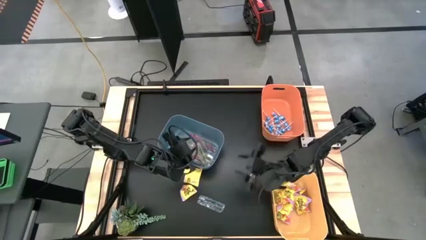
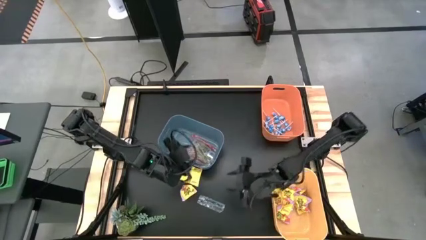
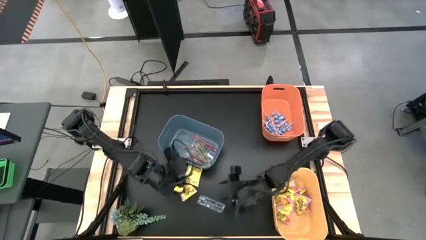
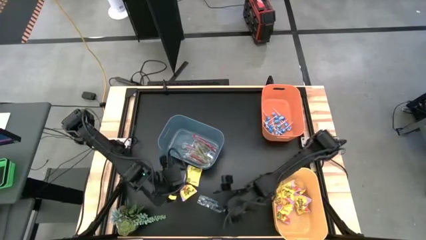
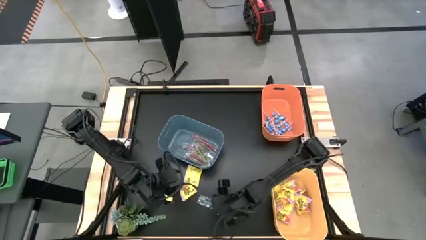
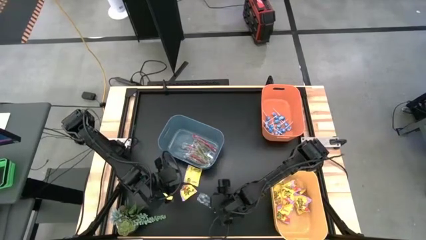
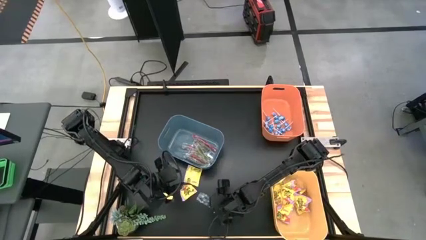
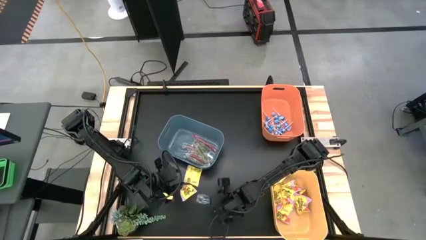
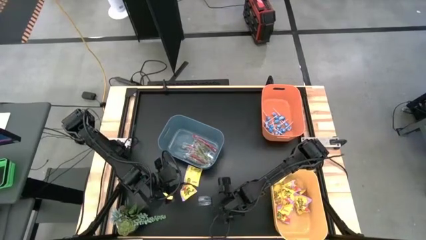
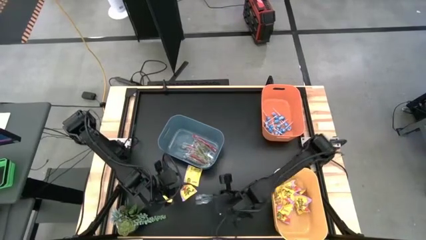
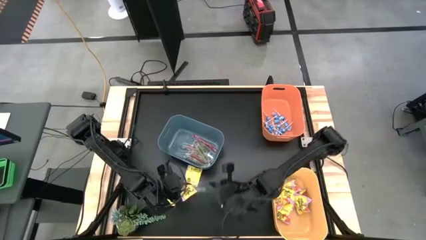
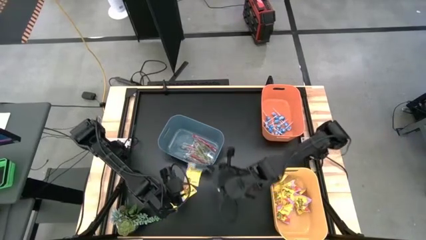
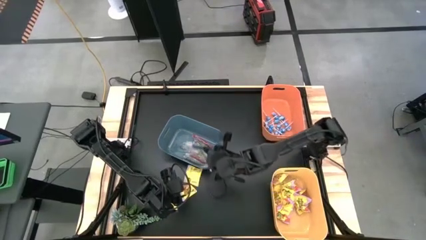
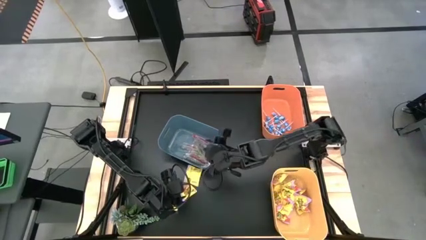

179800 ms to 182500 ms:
Task: Sort candy
Put the transparent candy into the blue bin

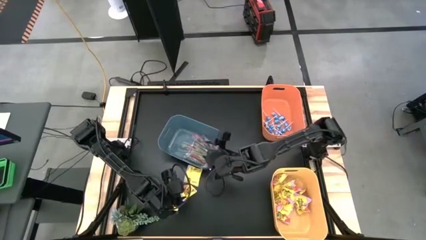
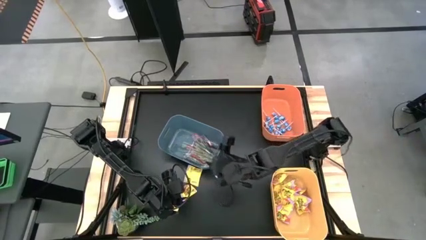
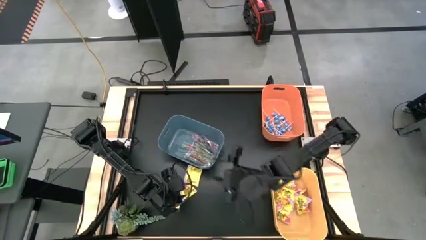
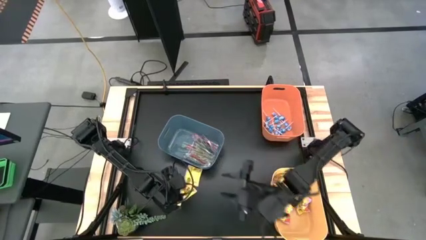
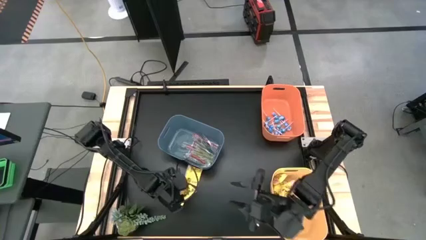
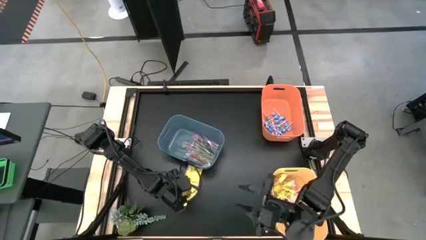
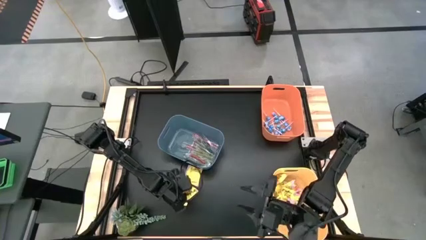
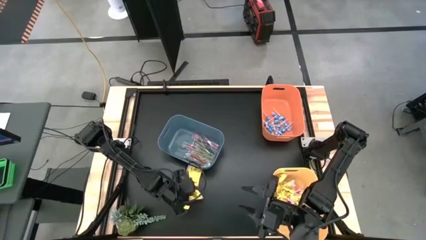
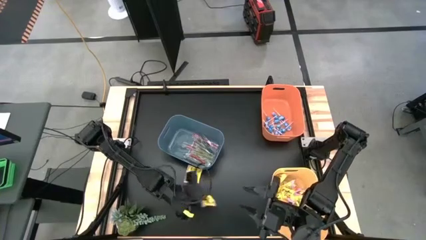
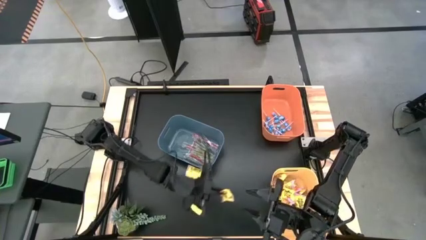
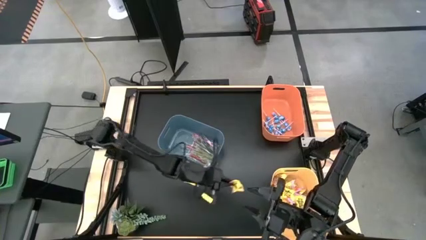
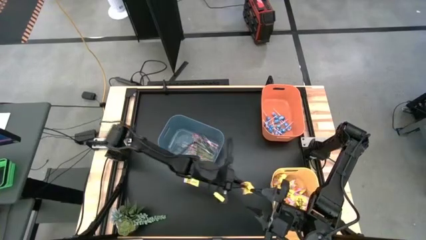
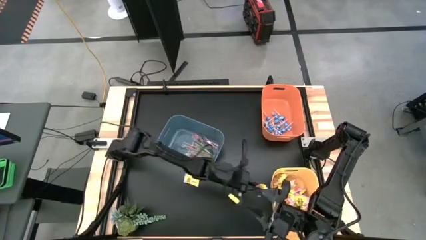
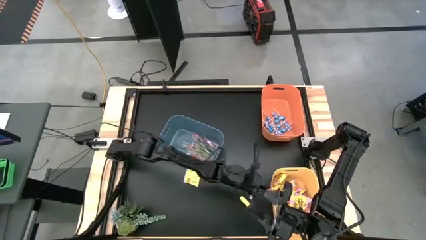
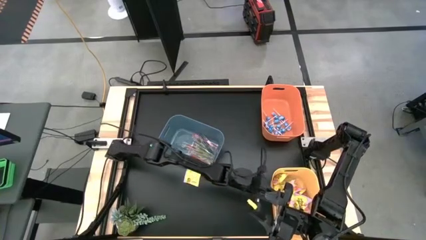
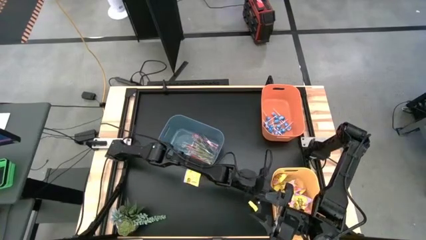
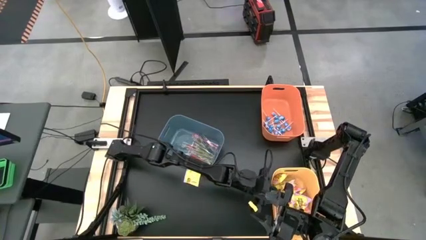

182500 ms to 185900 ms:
Put the yellow candy into the yellow bin

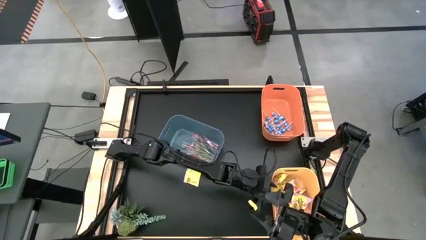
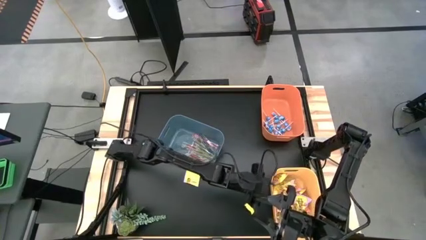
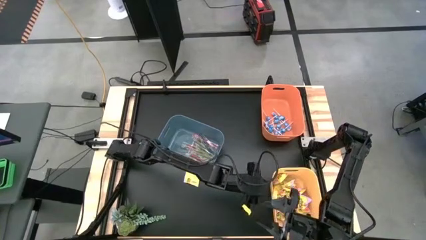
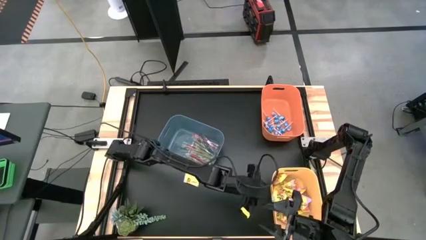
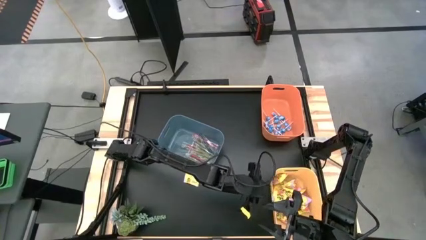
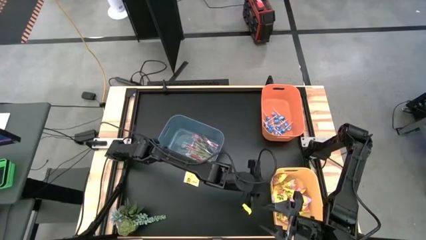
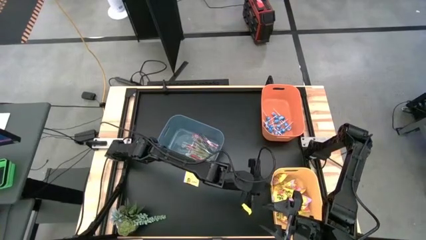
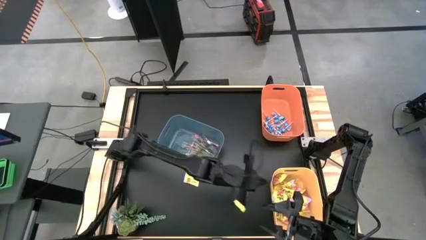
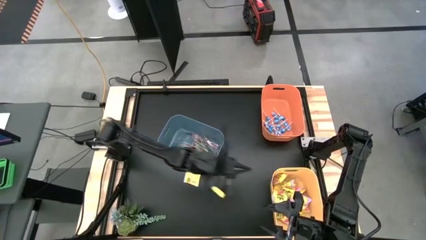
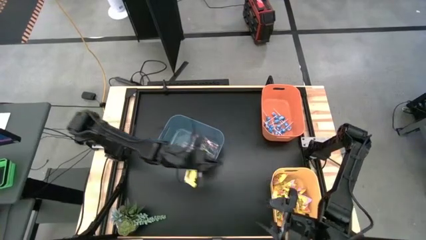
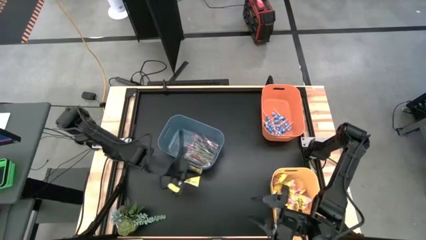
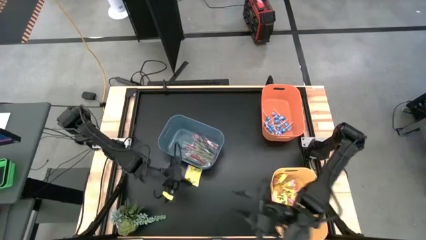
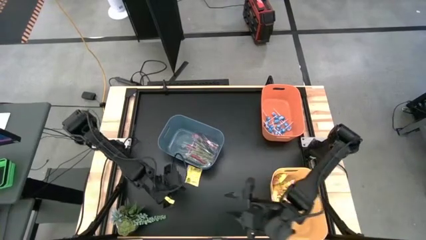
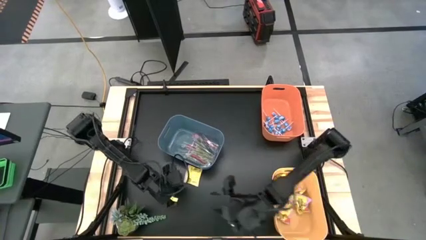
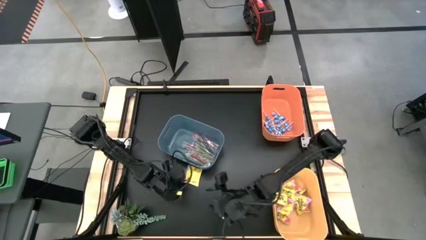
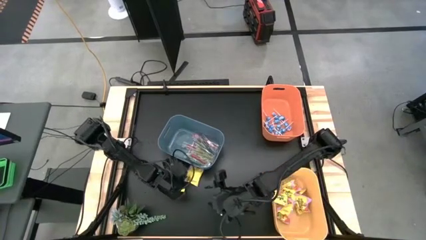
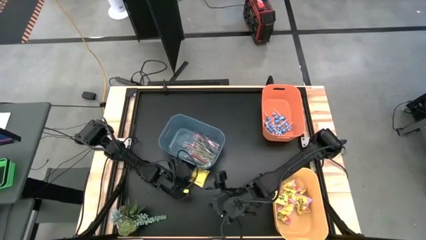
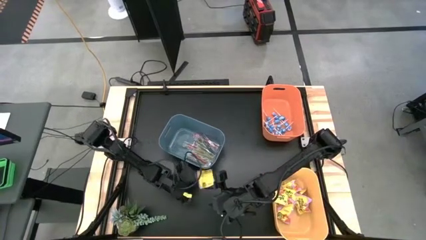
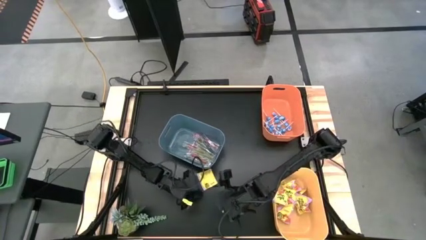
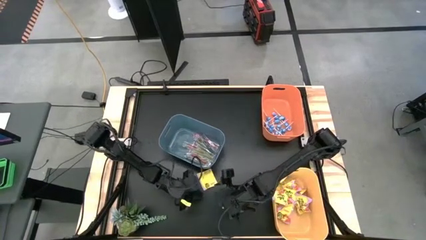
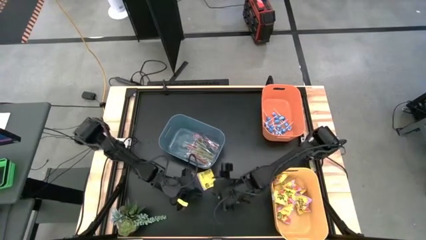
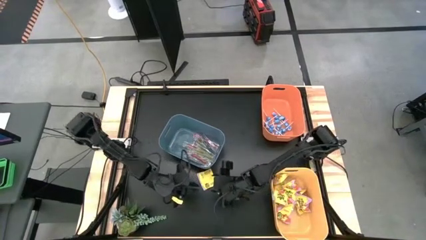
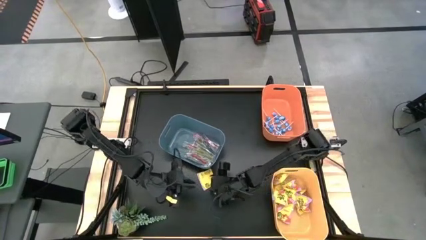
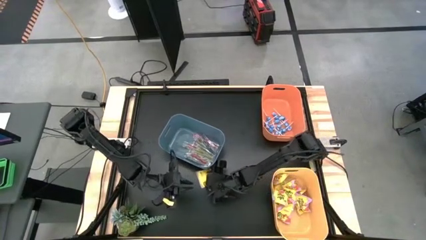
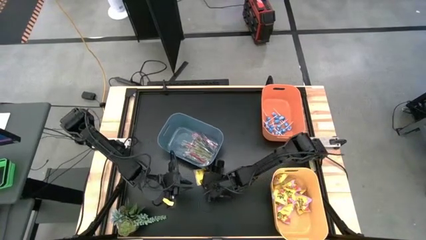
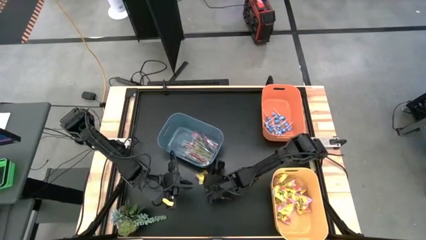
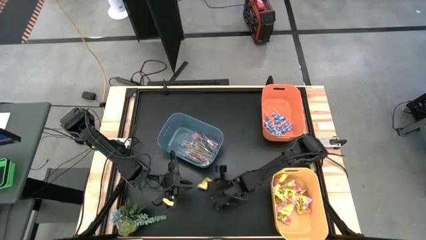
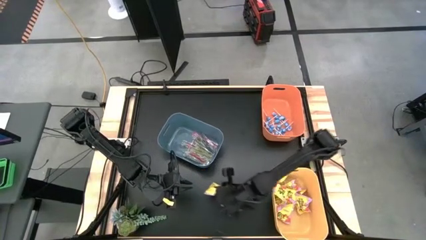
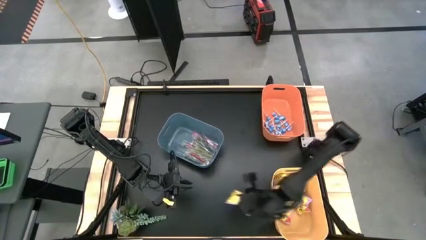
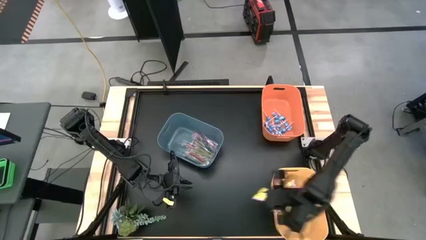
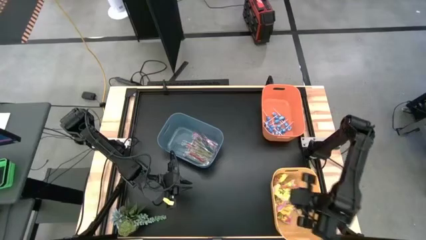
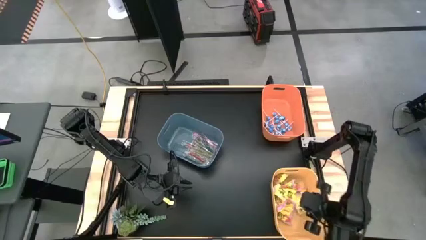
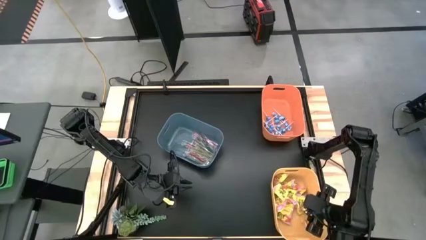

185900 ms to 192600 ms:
Put the yellow candy into the yellow bin

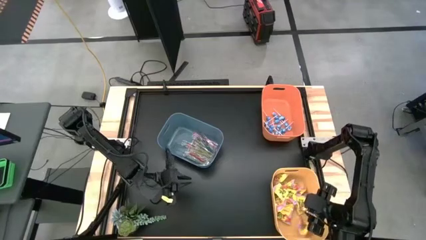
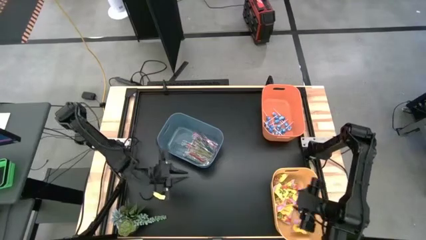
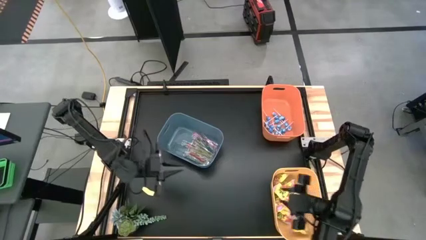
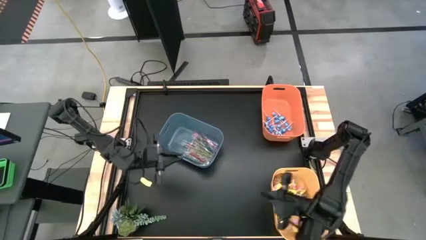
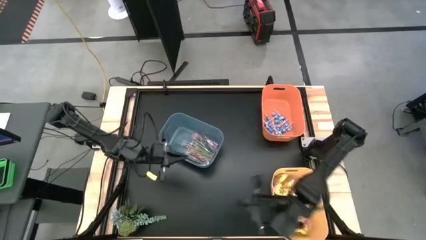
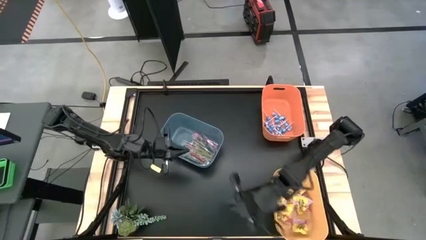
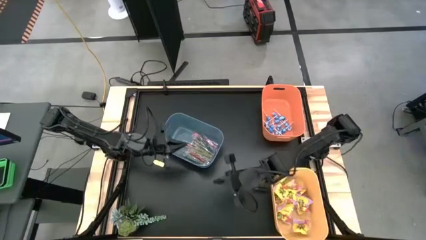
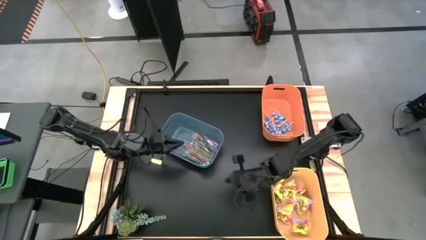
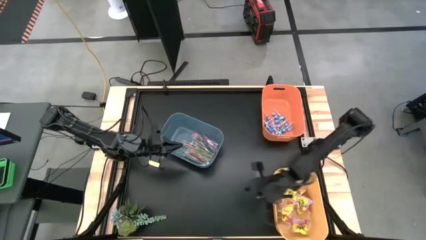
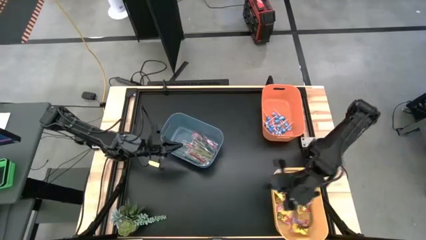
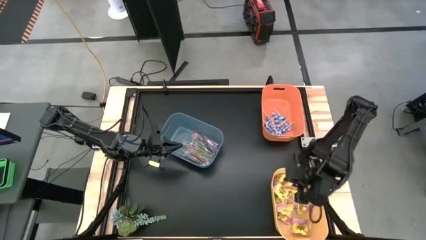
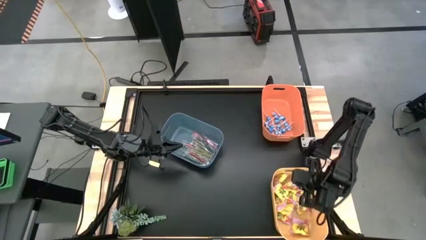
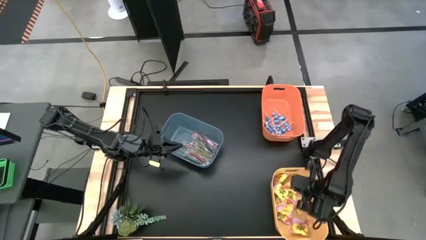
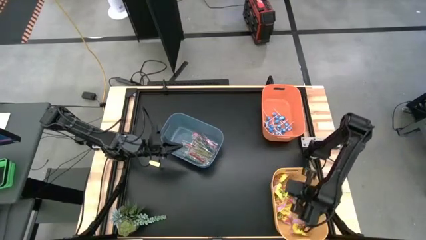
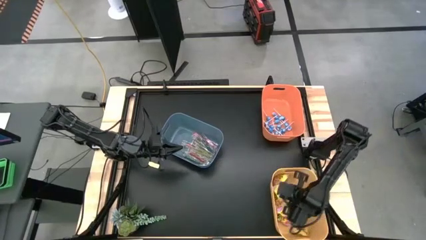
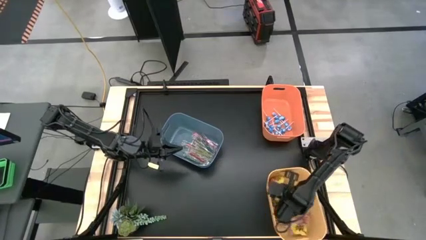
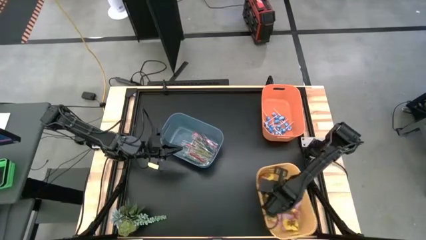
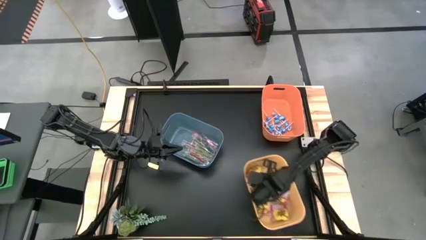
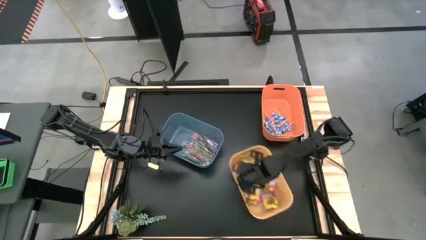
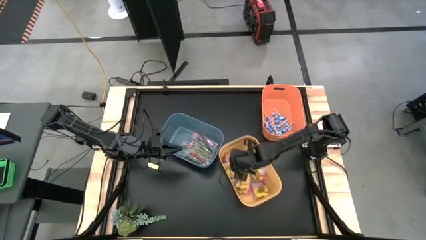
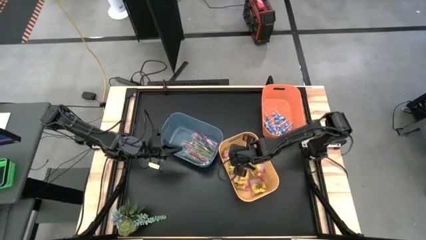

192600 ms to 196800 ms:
Move the yellow bin to the center of the table
